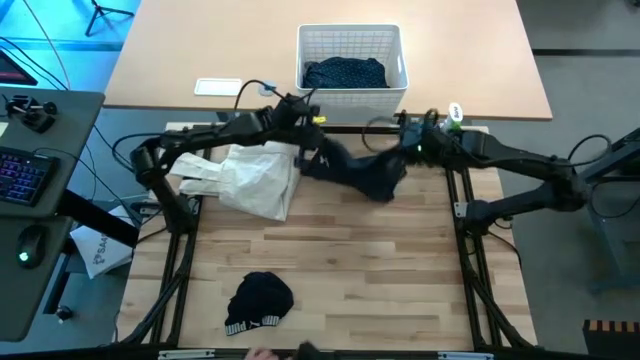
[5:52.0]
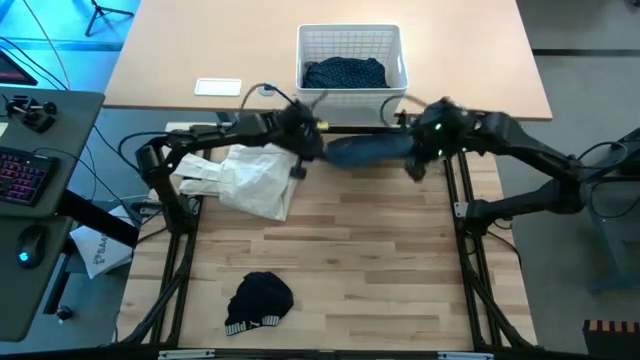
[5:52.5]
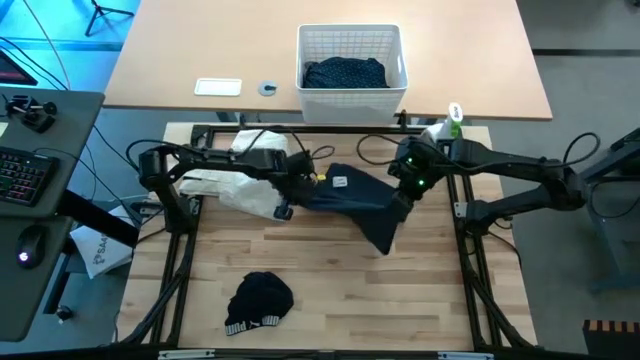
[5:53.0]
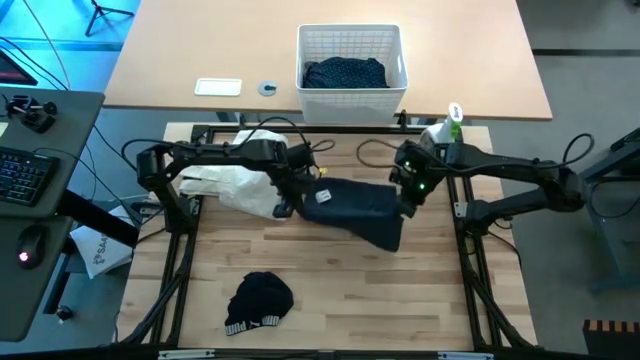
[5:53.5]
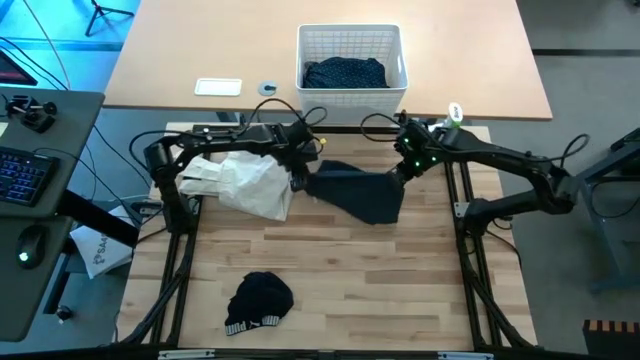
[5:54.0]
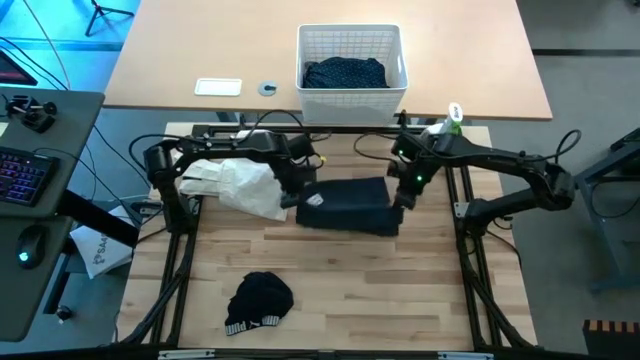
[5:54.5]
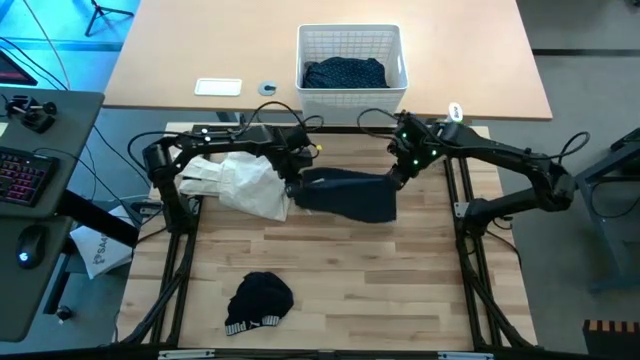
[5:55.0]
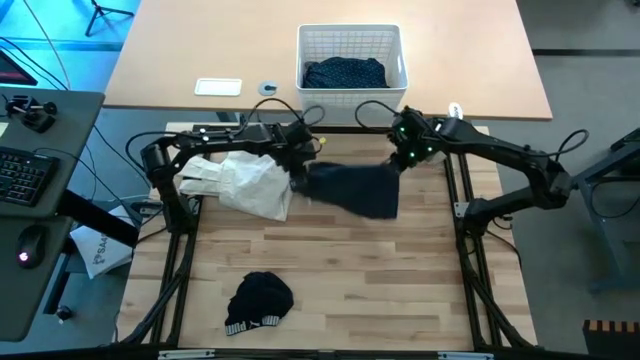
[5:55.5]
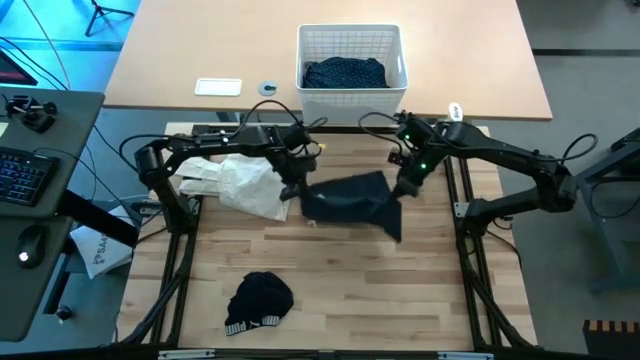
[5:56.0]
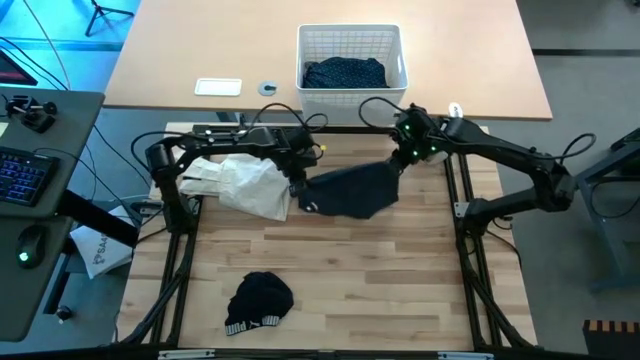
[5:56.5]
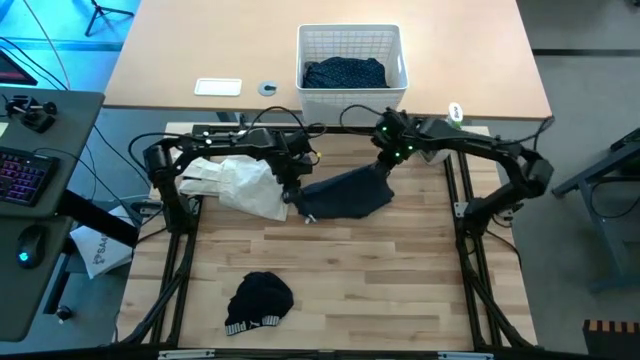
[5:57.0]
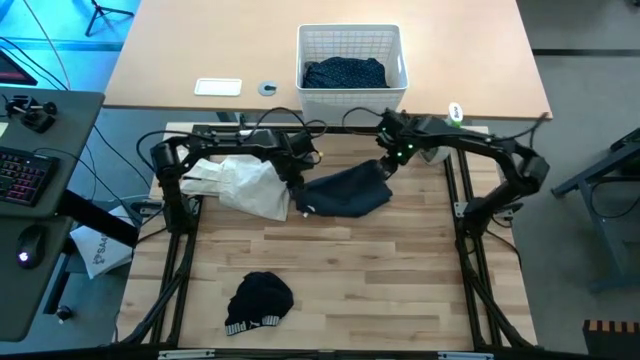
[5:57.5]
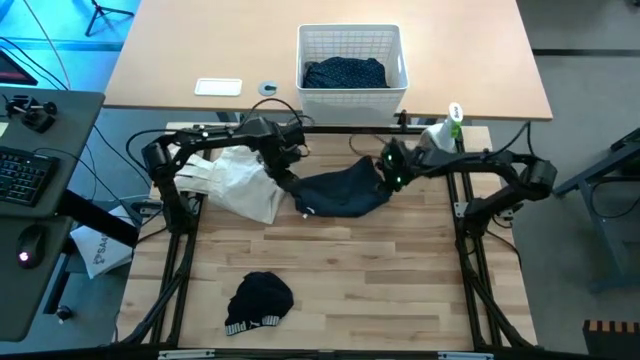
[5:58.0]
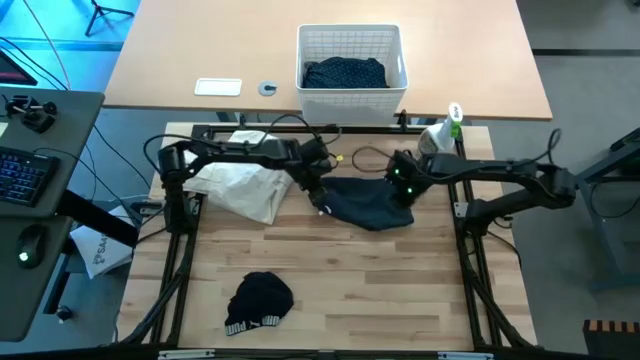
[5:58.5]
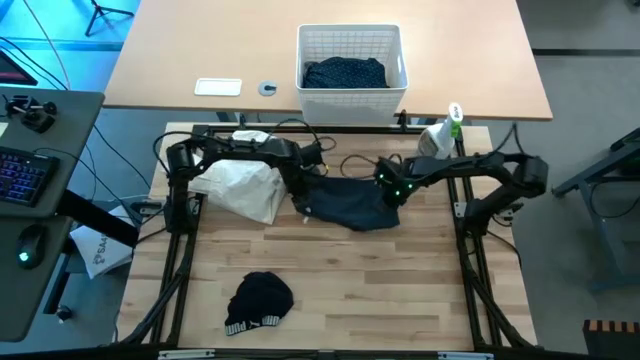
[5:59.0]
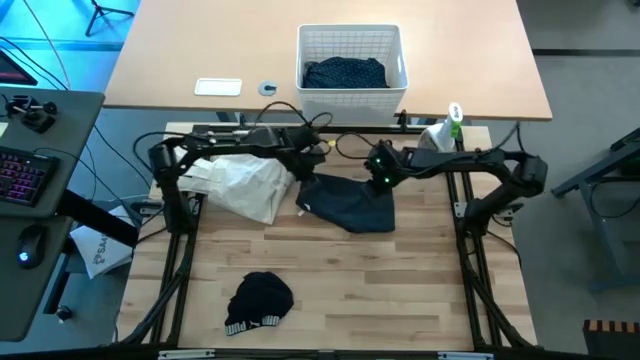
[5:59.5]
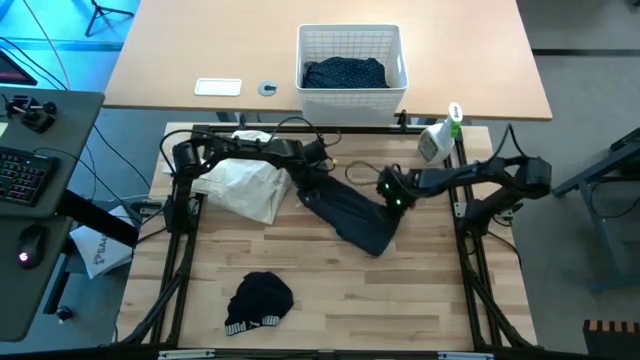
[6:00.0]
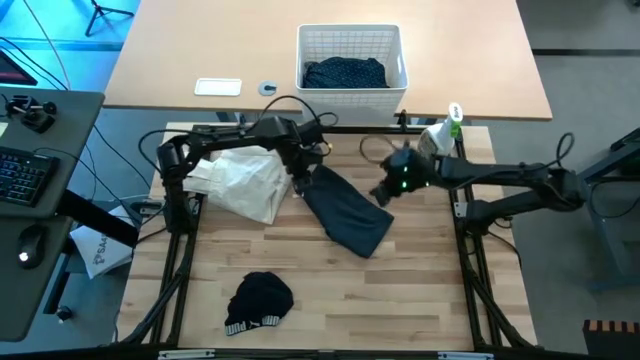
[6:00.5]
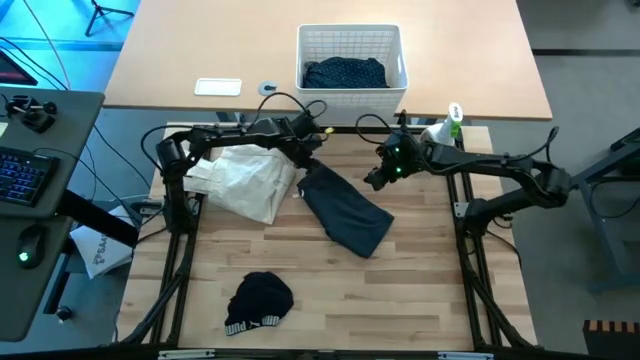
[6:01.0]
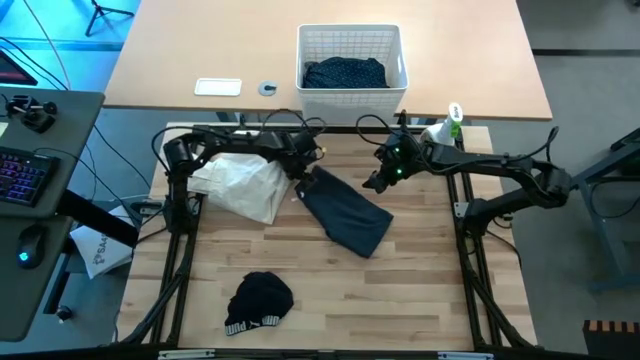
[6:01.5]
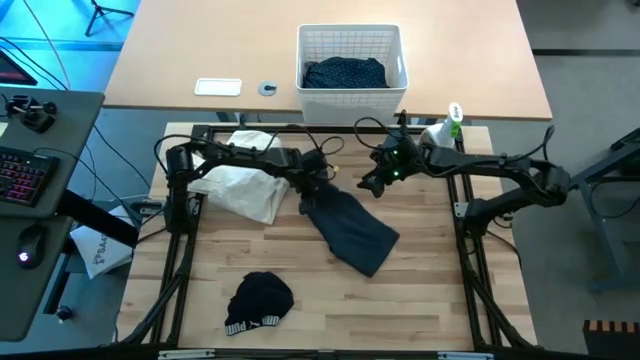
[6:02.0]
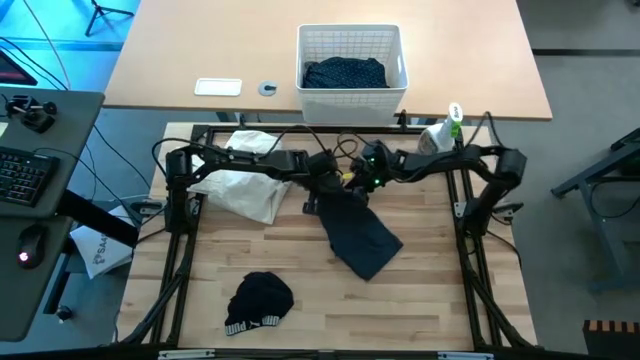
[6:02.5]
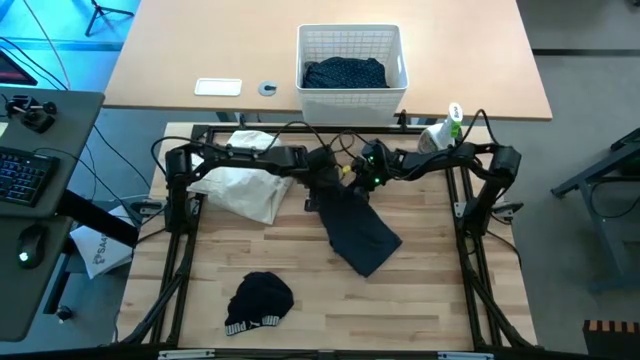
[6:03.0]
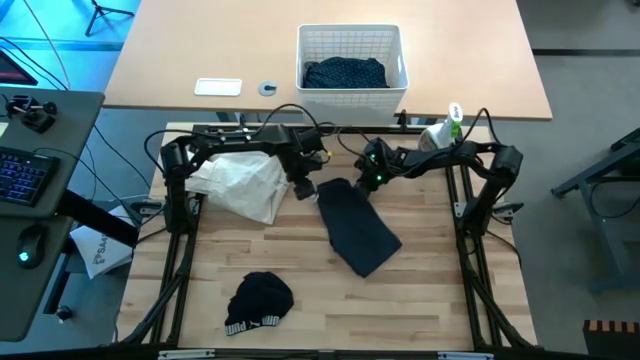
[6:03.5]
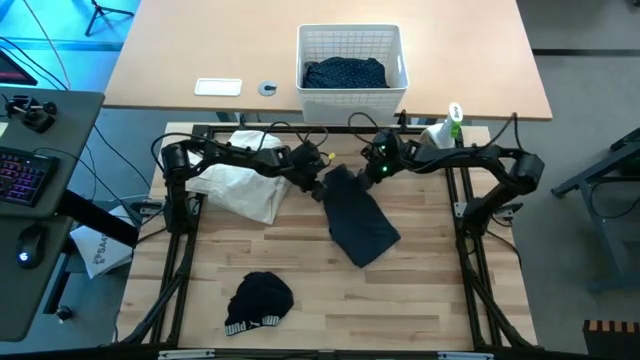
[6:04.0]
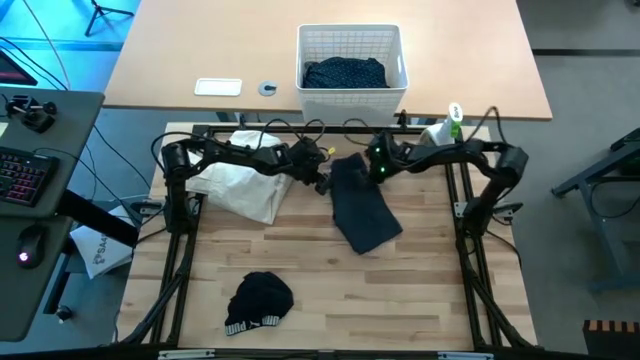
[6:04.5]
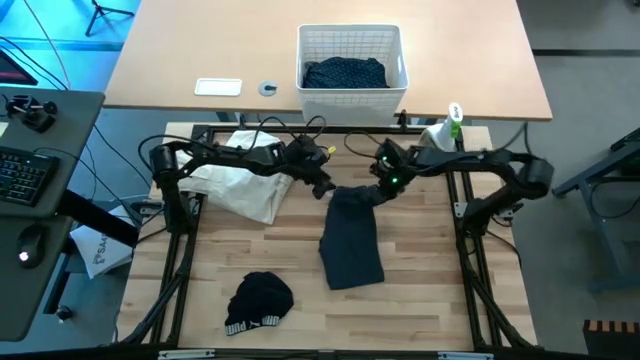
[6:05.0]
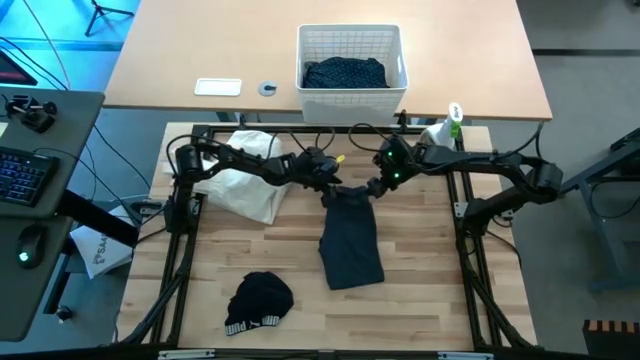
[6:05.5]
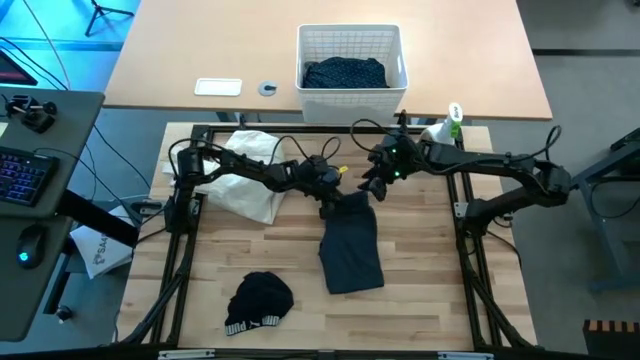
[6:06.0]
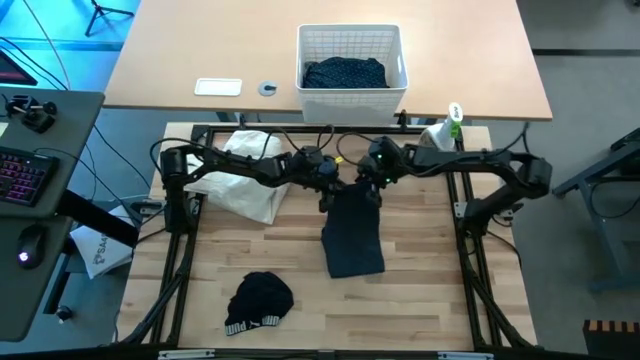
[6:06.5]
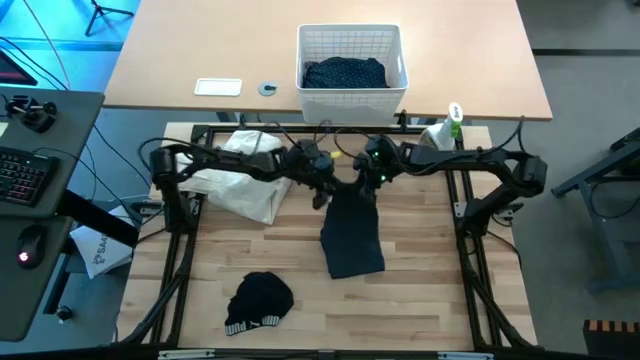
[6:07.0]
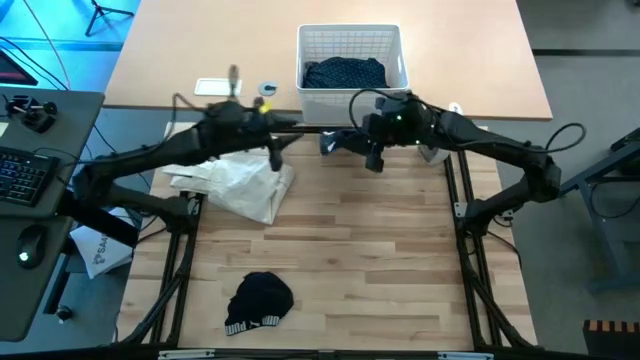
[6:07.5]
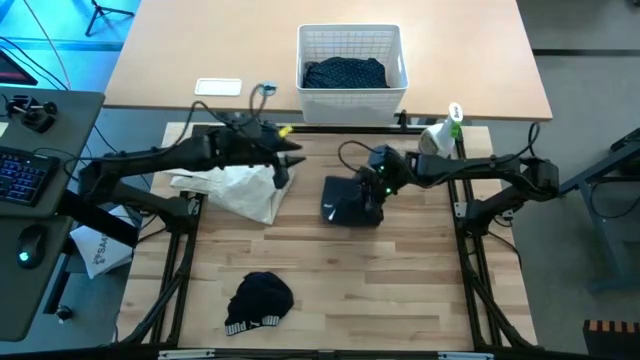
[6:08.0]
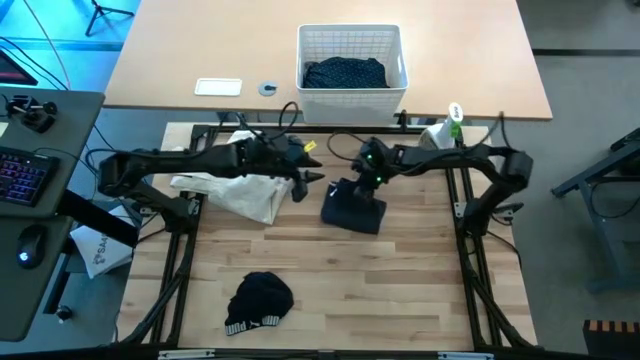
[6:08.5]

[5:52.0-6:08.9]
Task: Fold laundry
Fold the blue shorts

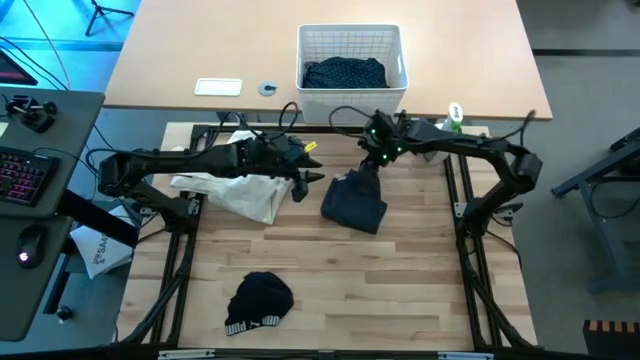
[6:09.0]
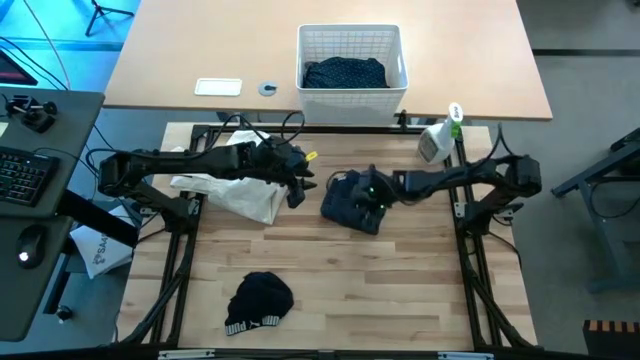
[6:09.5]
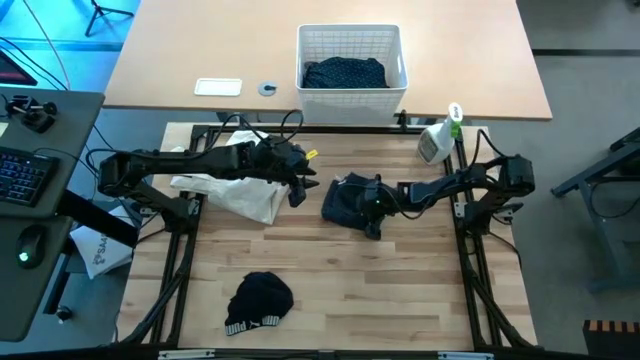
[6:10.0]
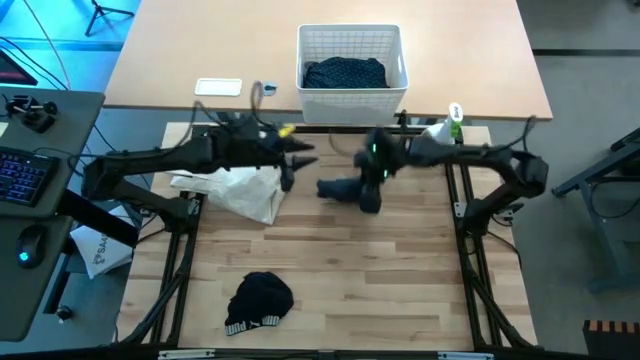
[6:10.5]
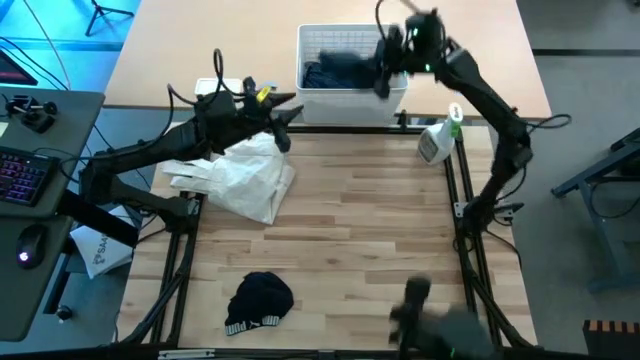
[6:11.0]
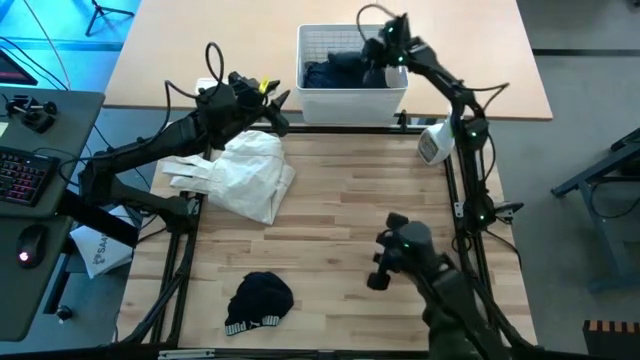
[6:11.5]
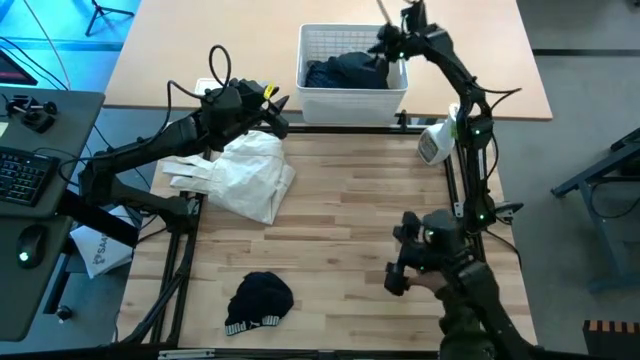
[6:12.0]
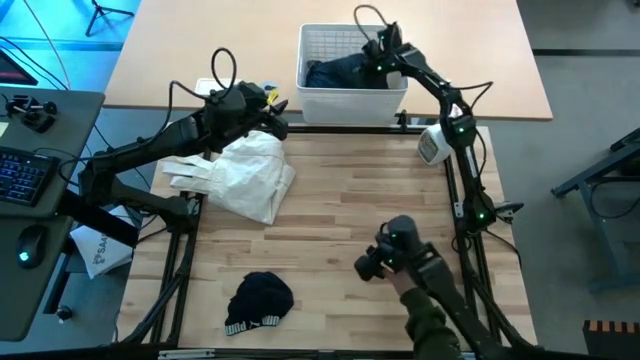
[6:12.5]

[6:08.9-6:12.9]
Put the blue shorts into the laundry bin
